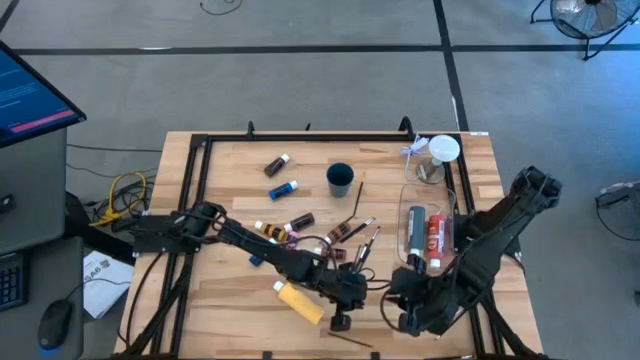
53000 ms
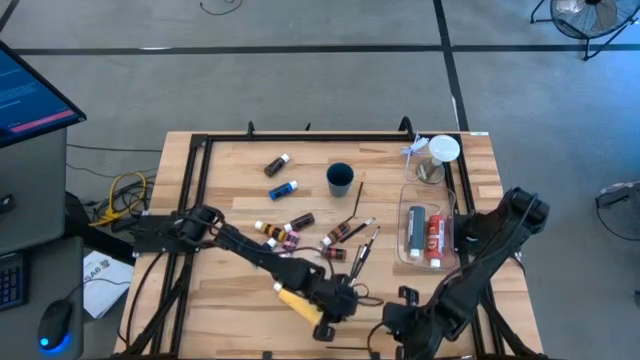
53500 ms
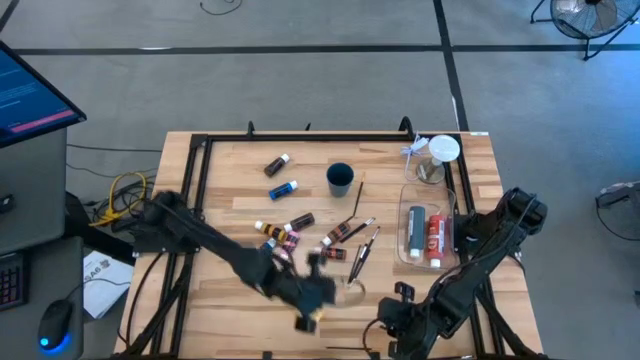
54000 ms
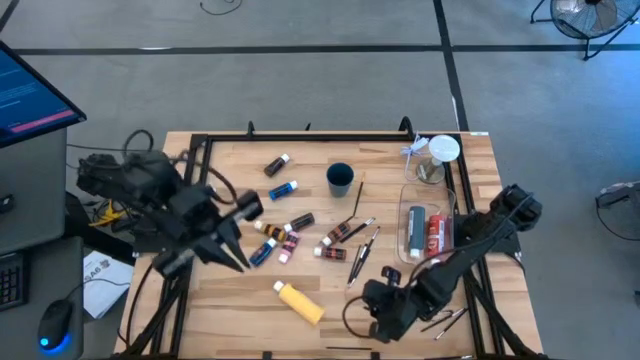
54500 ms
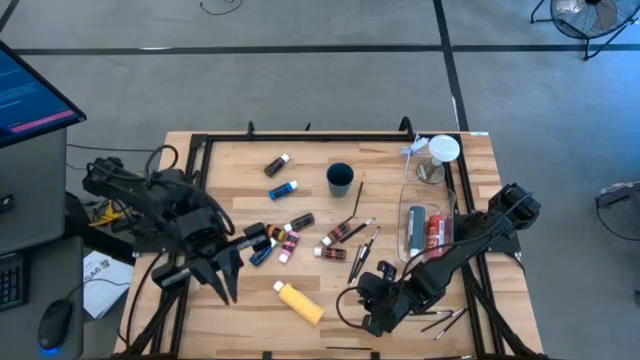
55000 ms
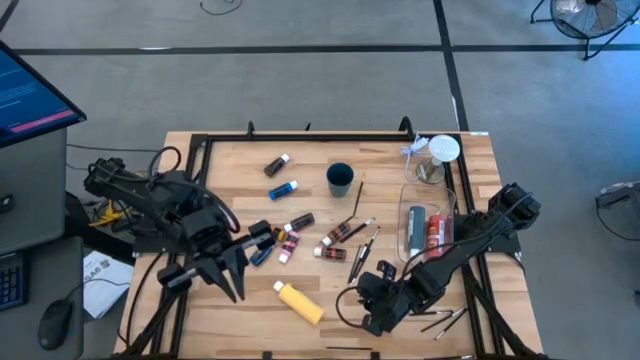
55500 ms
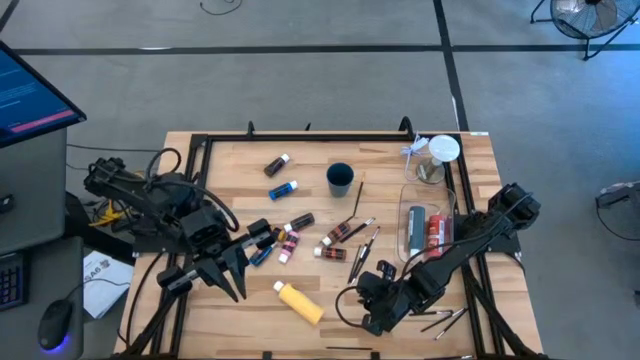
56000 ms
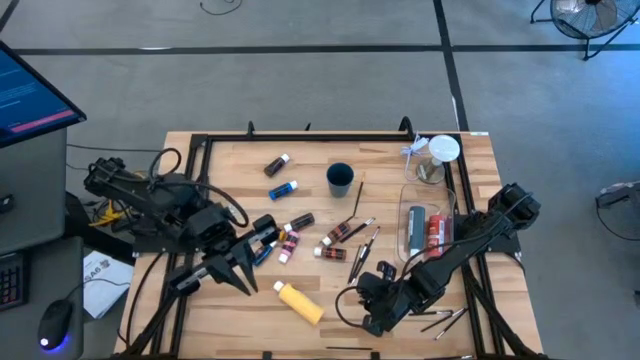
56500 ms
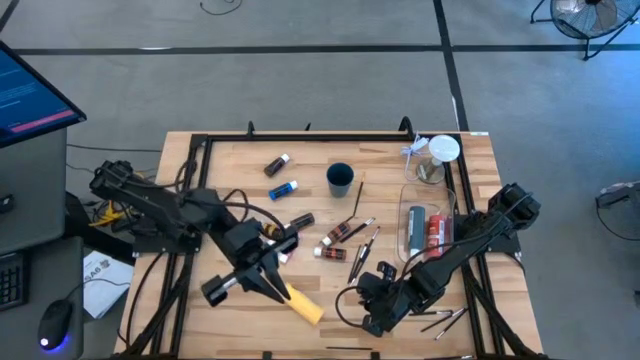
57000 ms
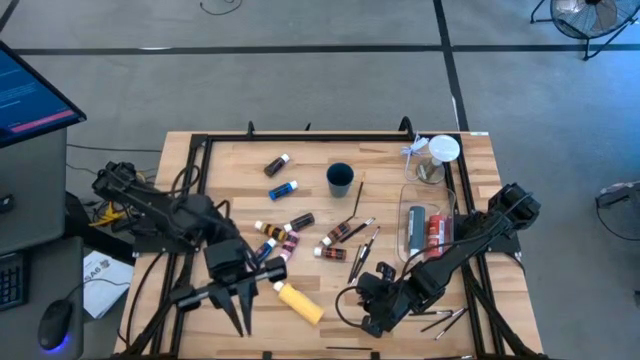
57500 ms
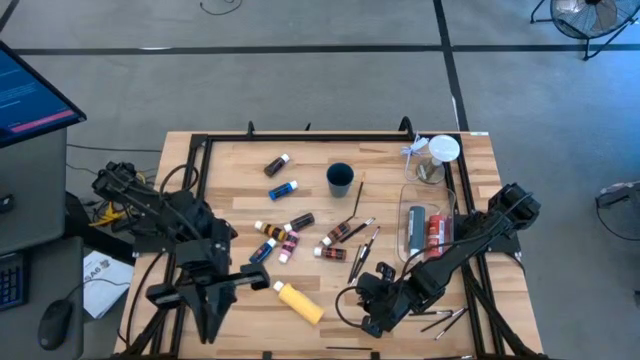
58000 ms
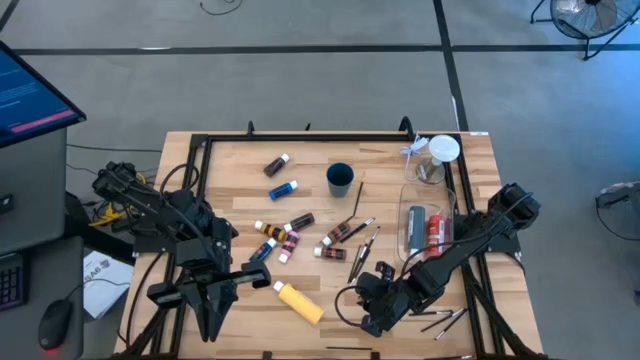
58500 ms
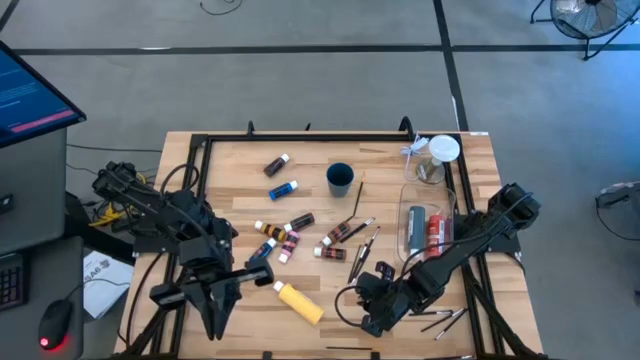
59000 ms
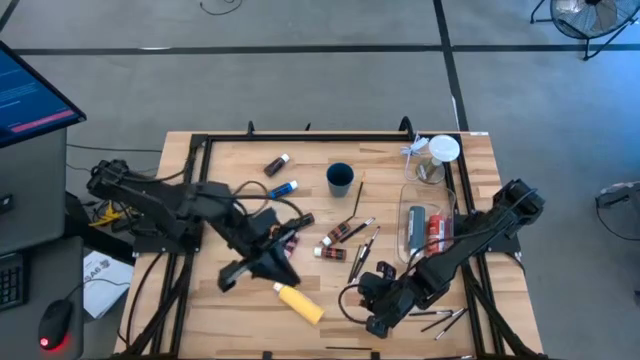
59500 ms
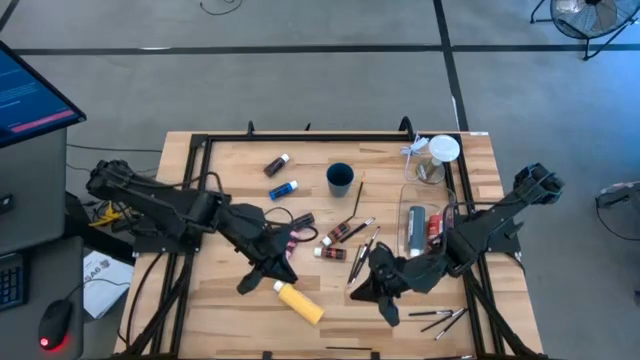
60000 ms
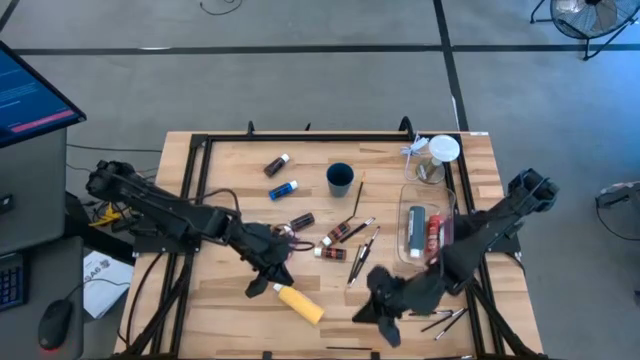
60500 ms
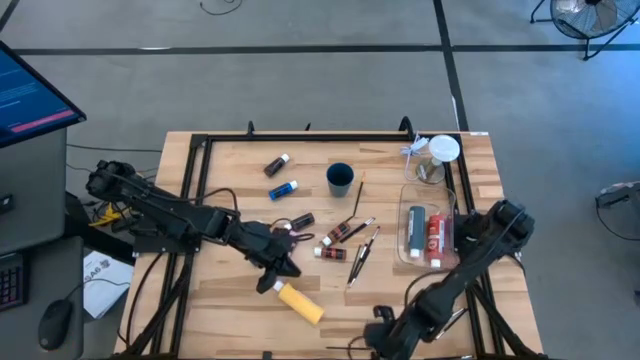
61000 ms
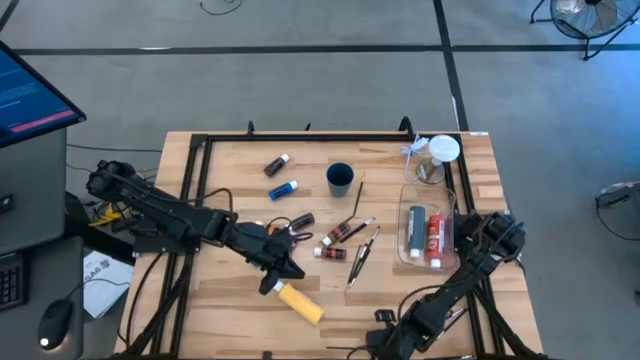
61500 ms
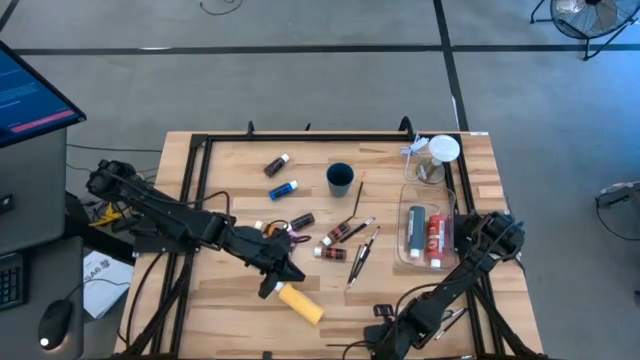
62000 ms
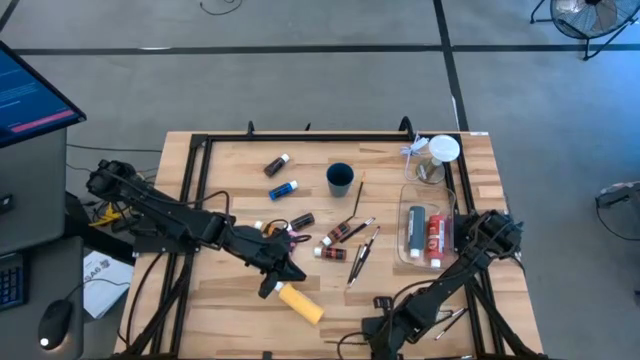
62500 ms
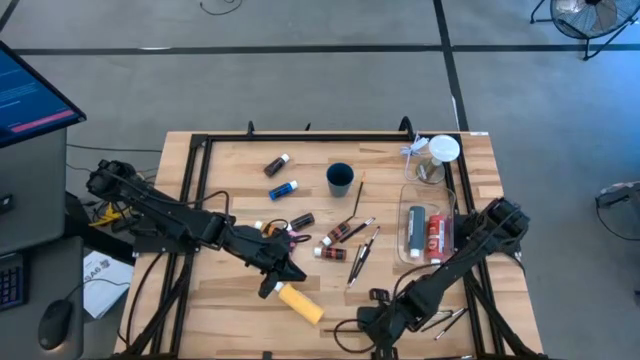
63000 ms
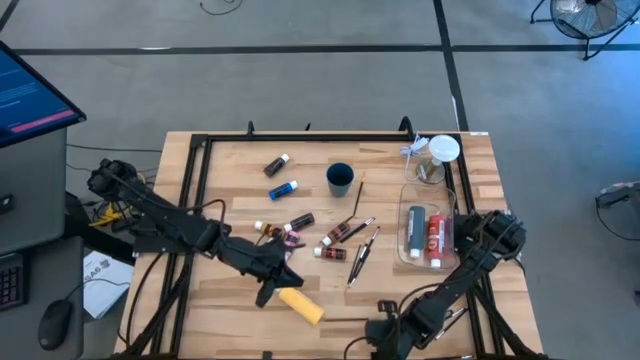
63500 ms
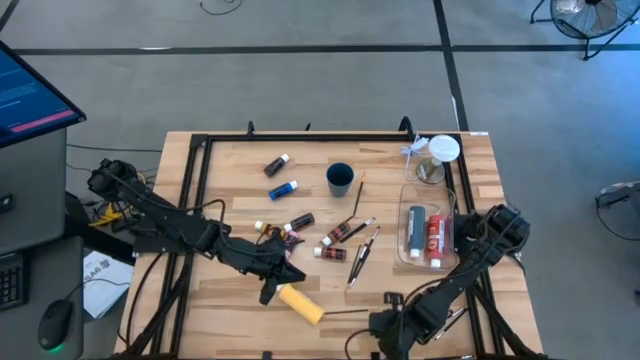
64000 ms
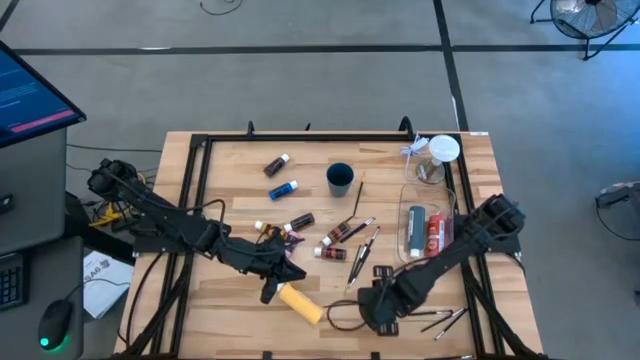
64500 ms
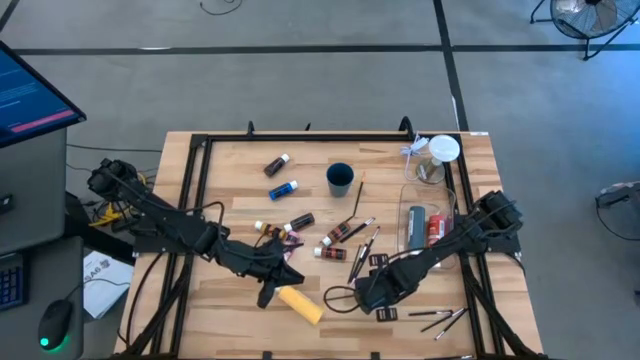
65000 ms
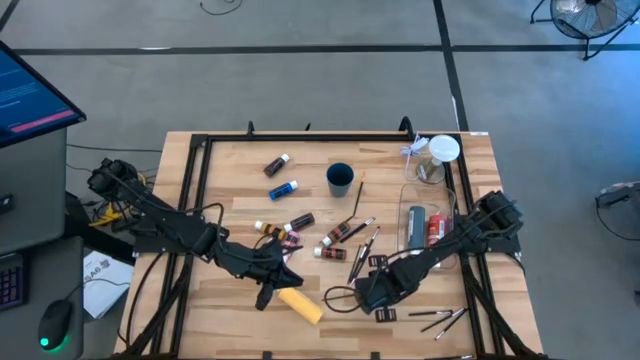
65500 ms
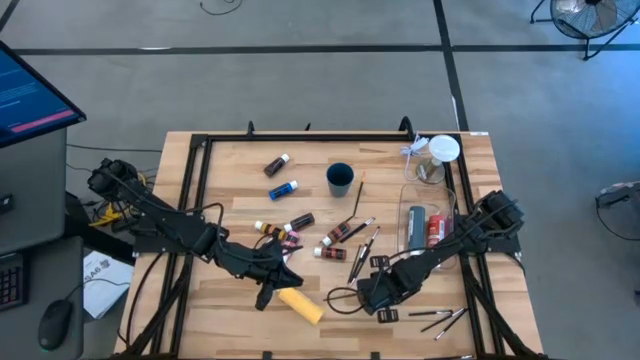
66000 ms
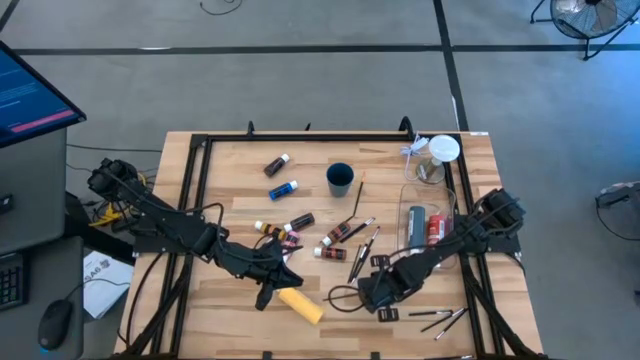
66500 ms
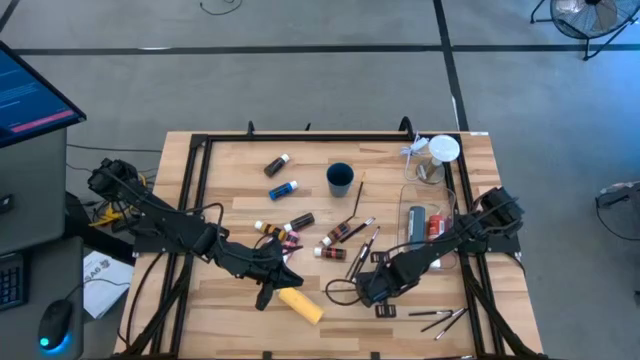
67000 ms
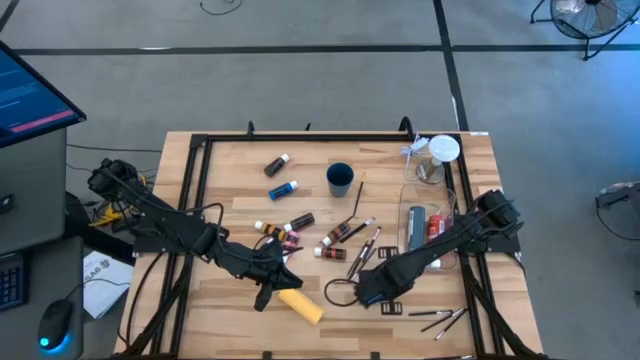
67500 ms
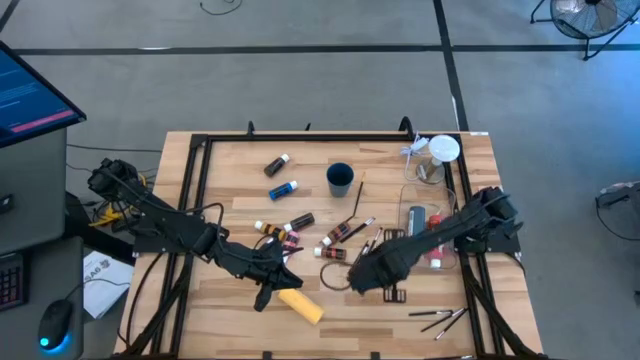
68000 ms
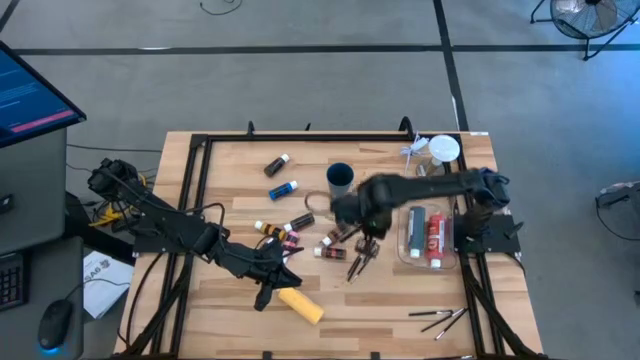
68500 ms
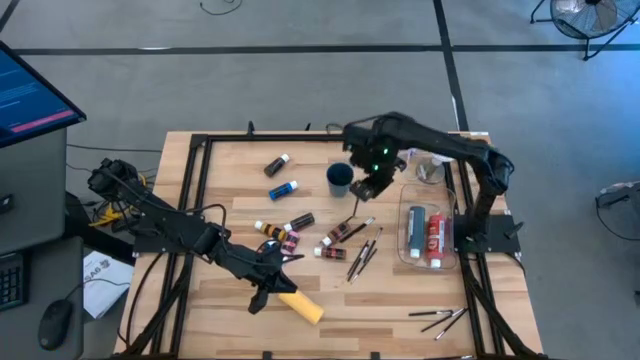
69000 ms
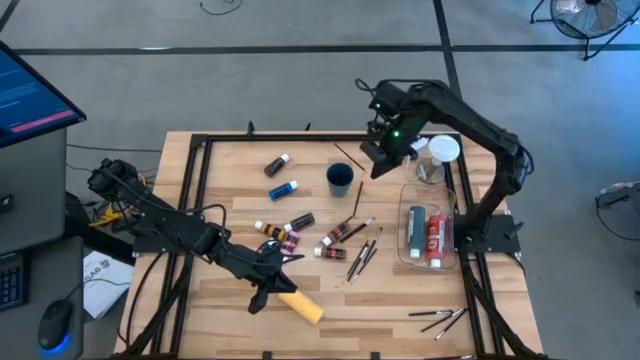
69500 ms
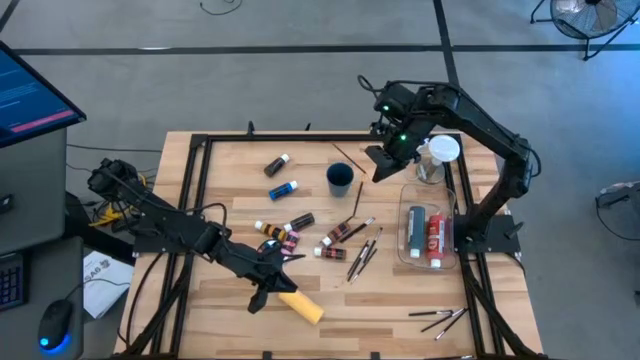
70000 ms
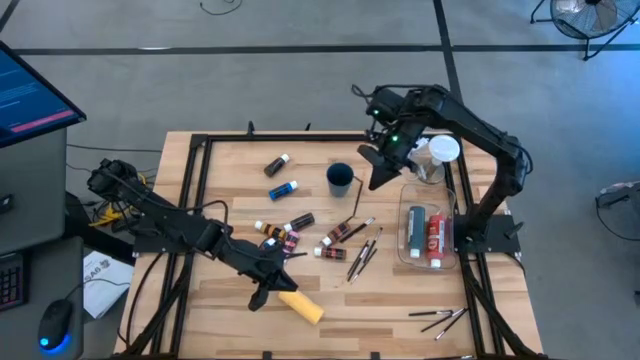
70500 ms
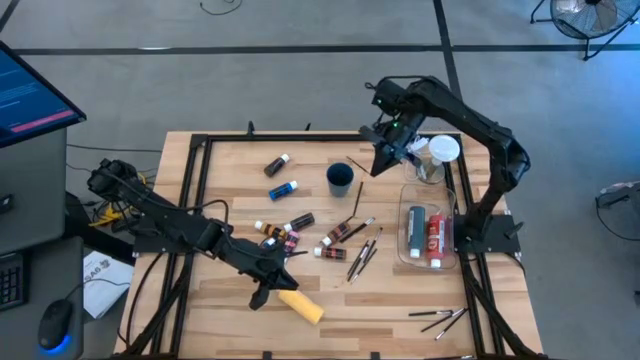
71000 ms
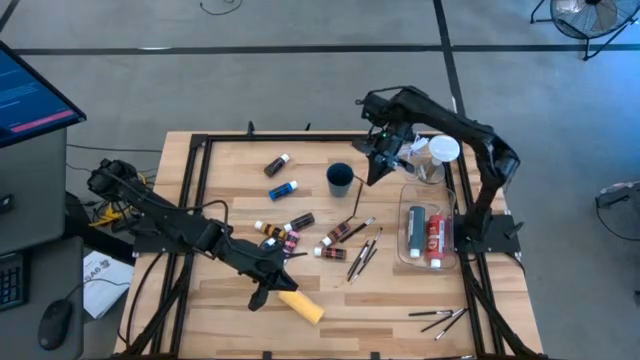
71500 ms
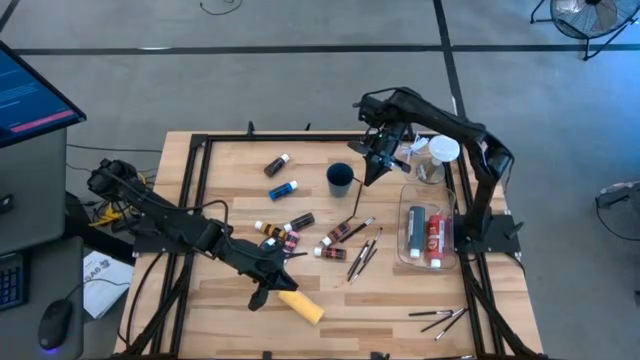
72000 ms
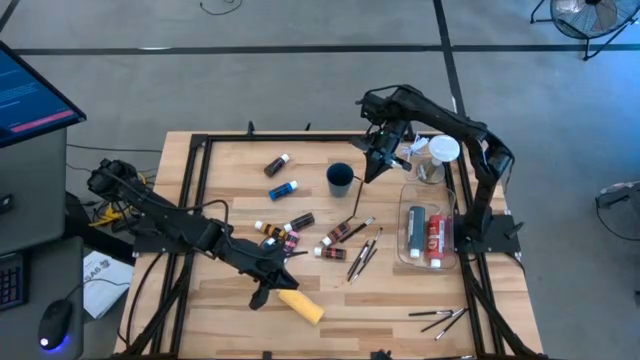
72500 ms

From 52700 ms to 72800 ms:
Task: Pick & Place Paint Supplies
Put the paint brush into the blue cup

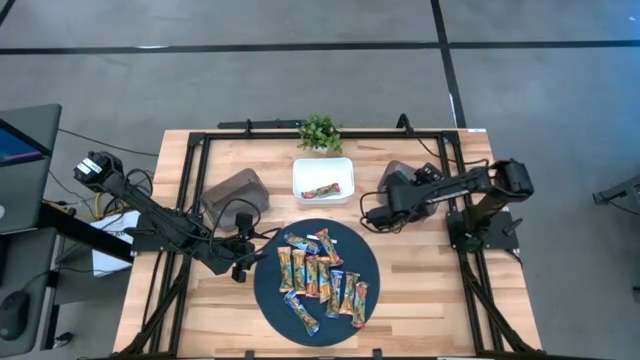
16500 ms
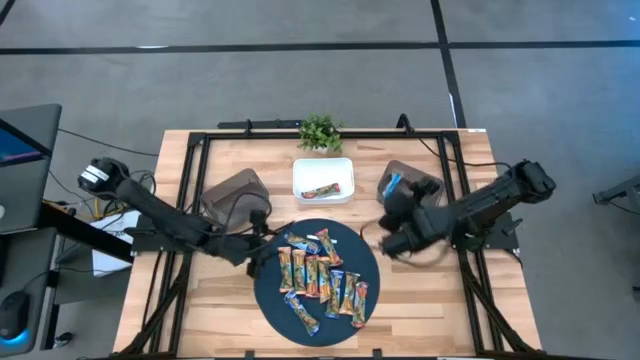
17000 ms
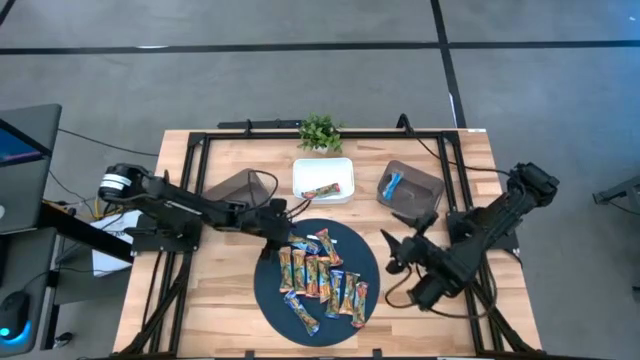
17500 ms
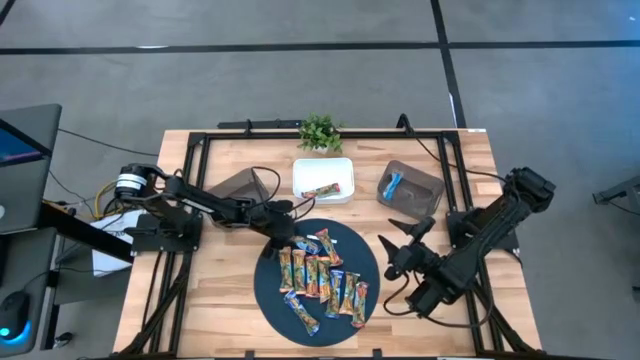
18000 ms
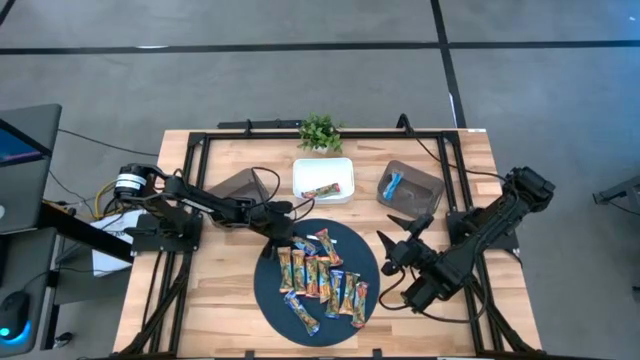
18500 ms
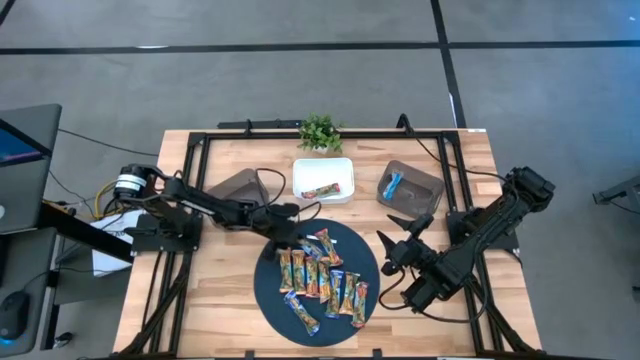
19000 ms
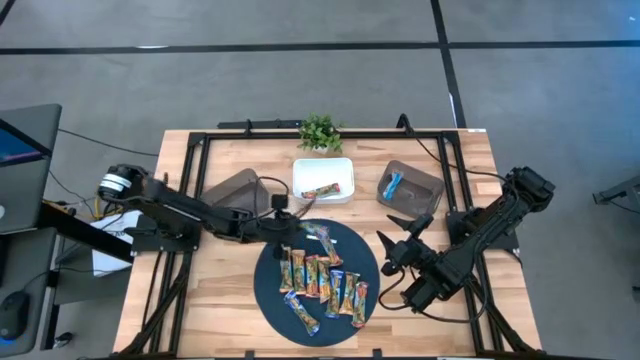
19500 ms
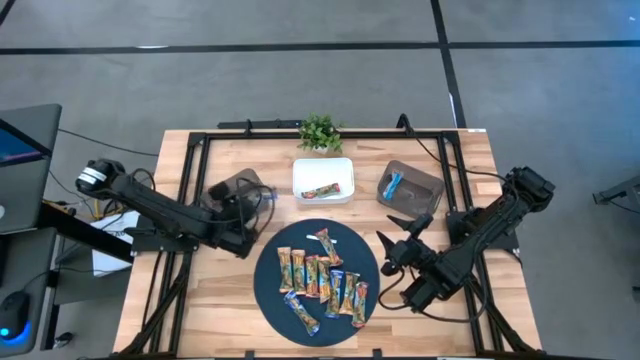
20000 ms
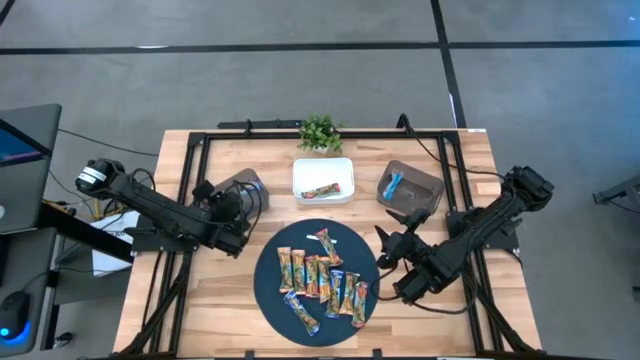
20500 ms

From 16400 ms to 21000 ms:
Task: Pick and place Granola Bars by type
Put the blue granola bar into the left black bin
